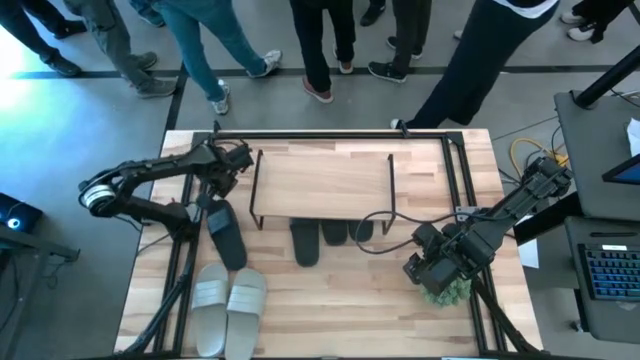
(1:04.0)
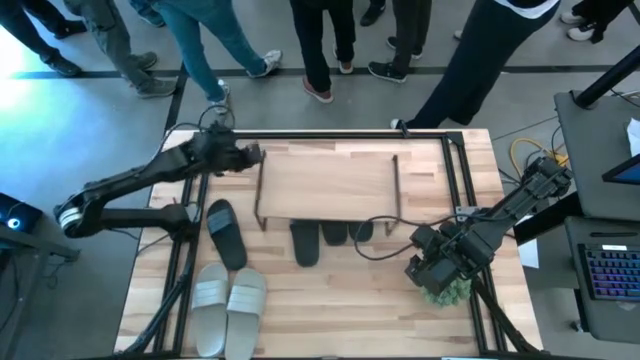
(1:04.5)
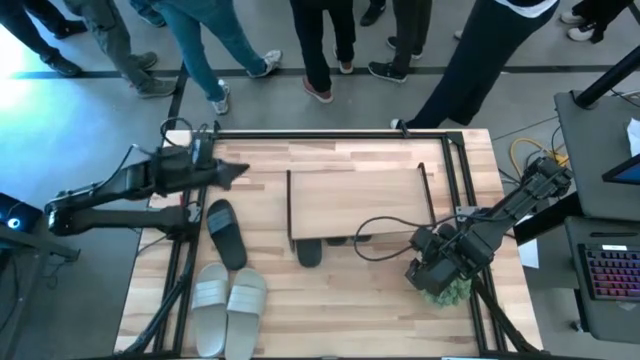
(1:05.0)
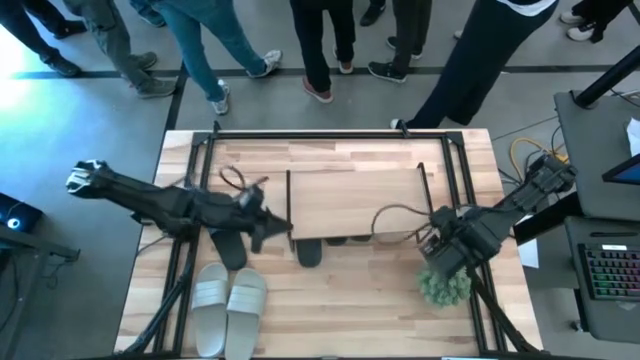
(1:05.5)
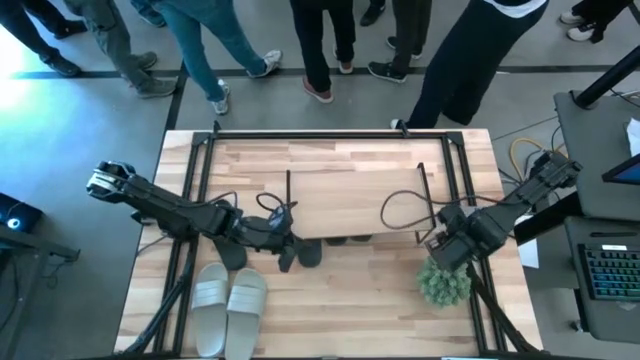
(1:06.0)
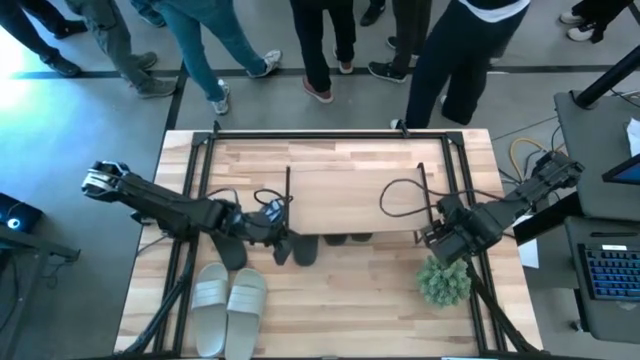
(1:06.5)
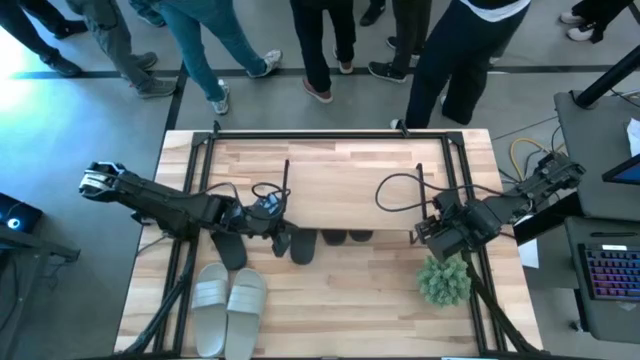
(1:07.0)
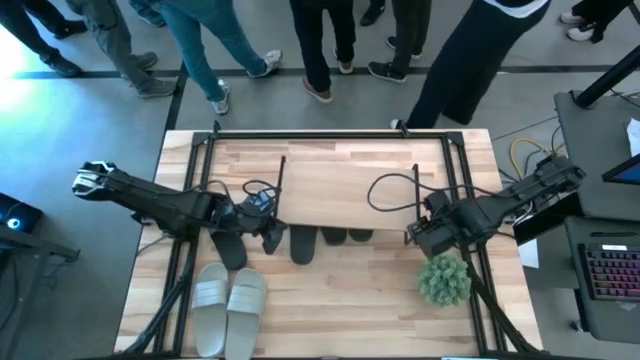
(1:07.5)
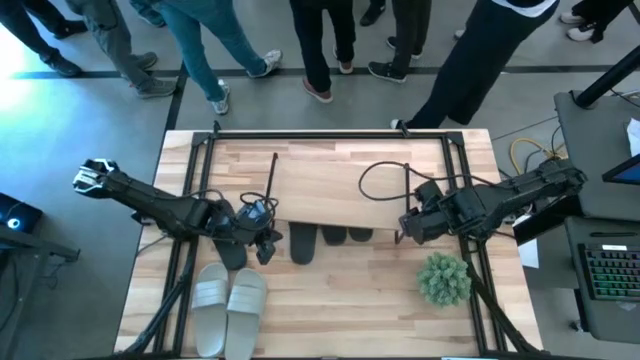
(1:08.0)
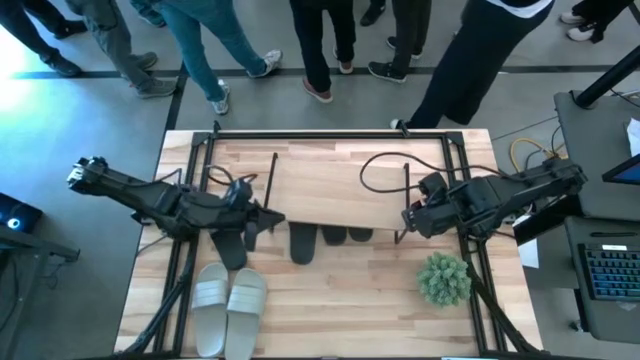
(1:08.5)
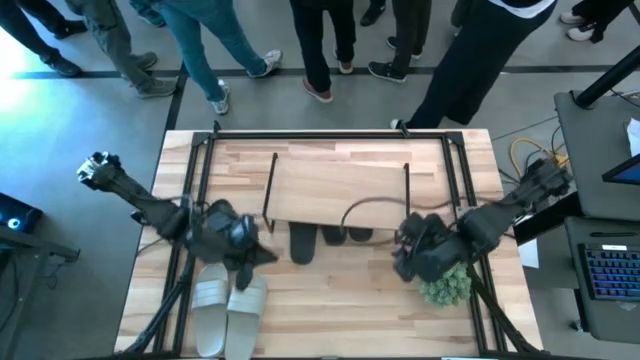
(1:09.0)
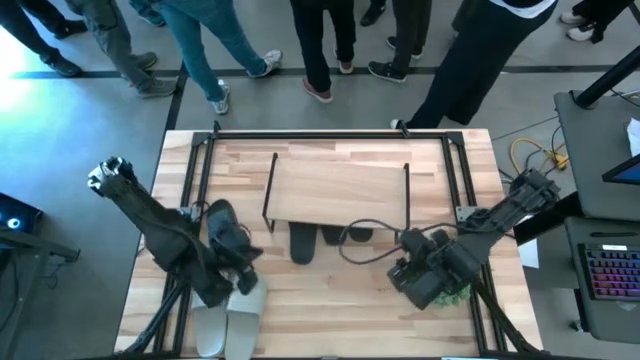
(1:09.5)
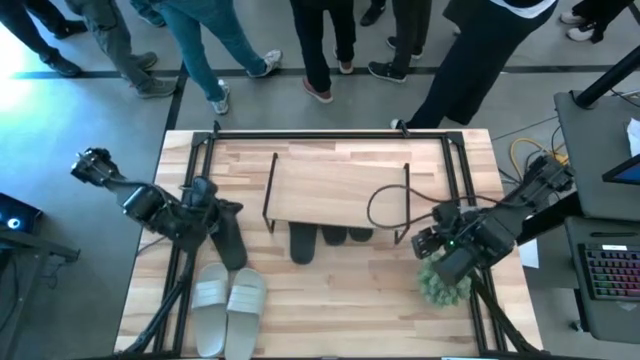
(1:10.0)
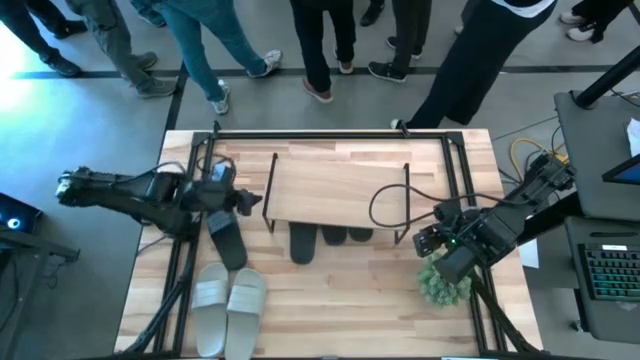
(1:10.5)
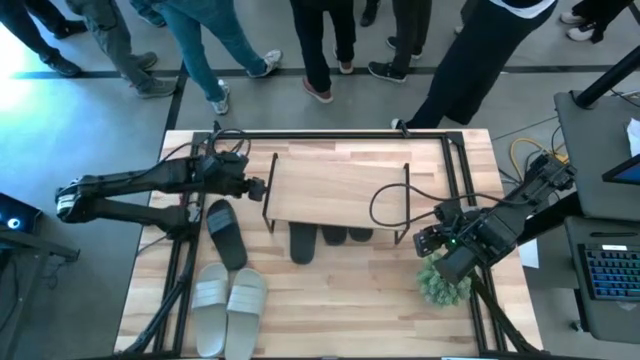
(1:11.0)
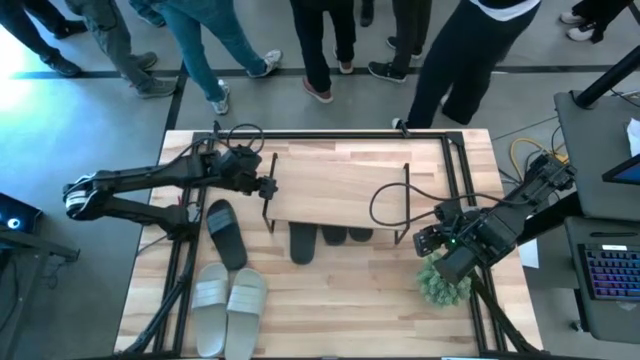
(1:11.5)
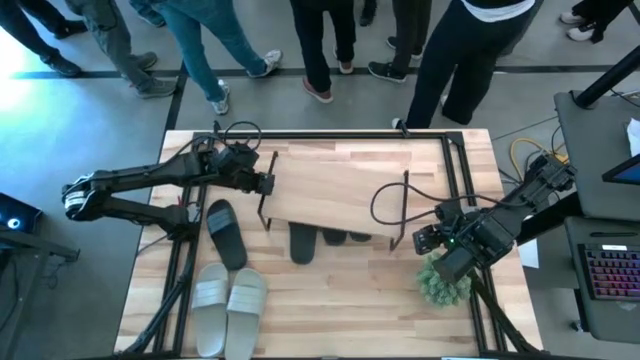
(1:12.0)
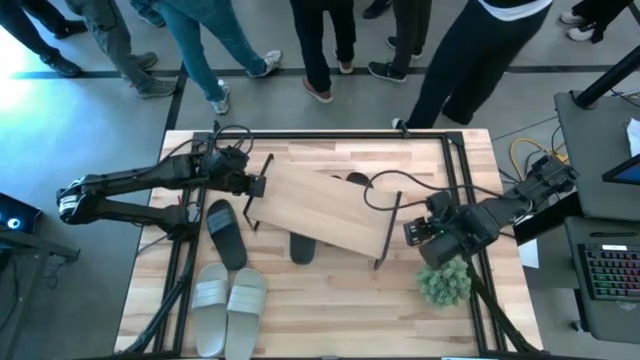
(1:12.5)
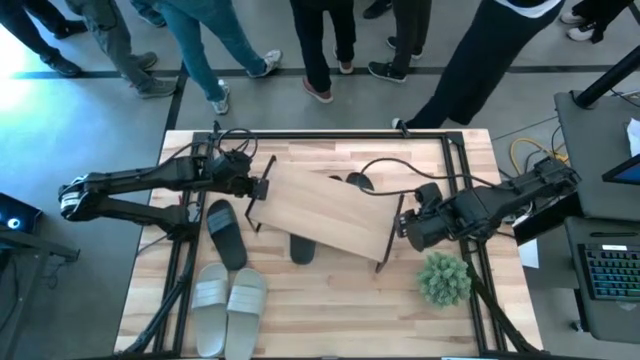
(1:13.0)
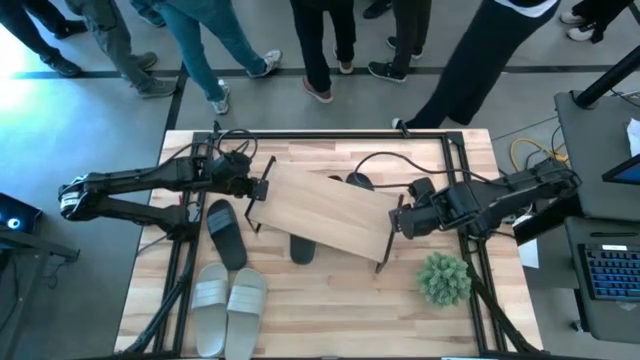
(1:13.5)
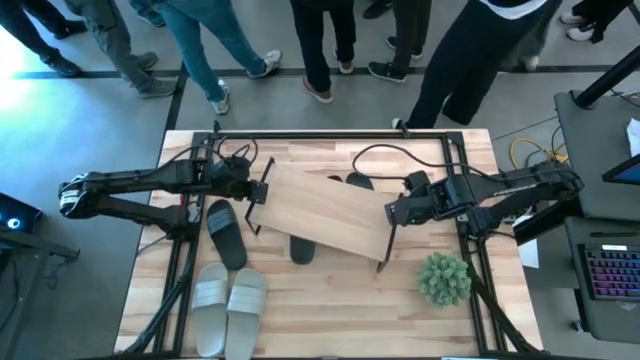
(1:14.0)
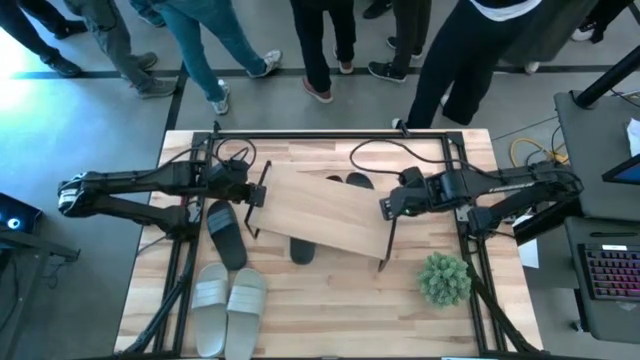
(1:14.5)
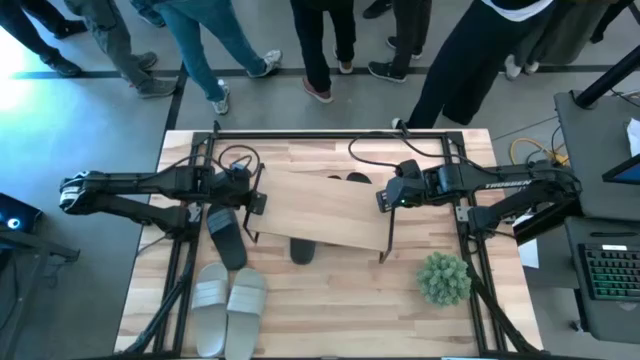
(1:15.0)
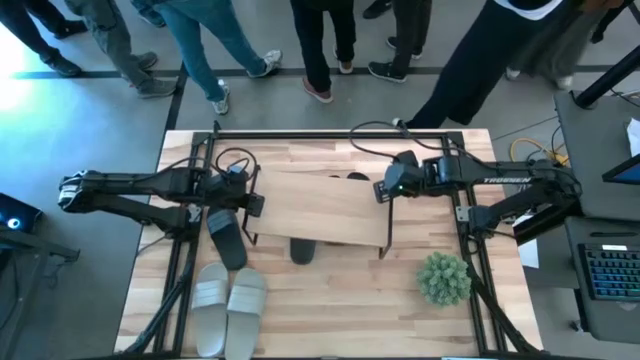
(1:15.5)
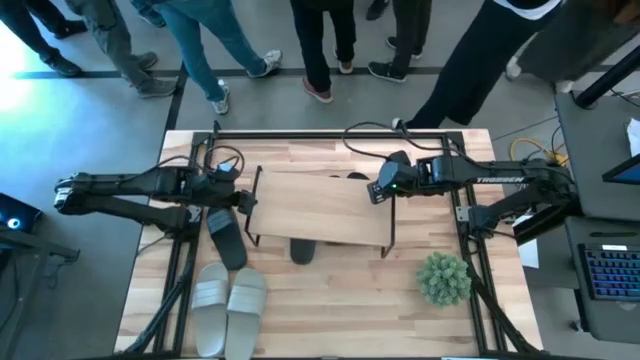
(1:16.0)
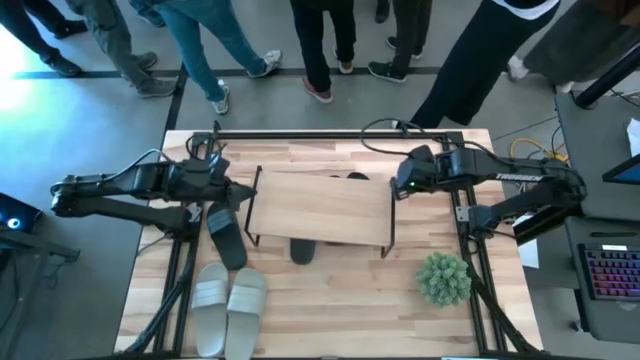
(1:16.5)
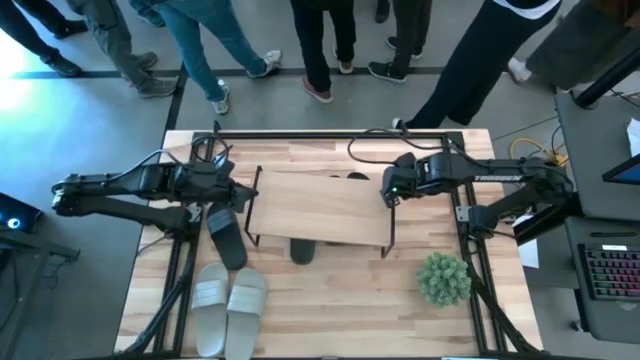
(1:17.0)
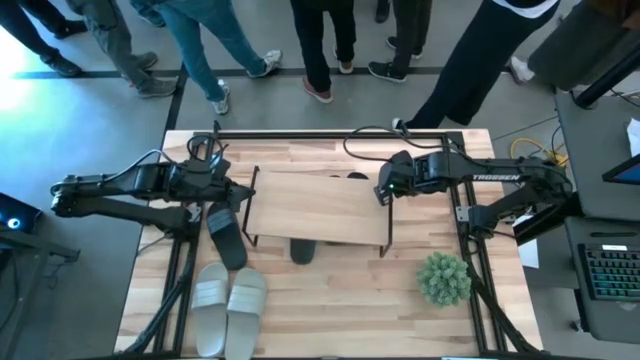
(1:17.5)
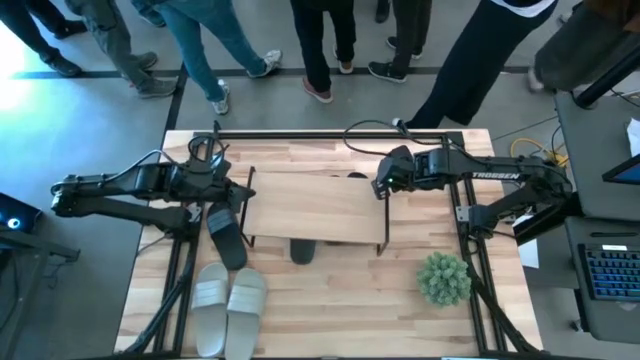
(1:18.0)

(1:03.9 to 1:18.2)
Task: Pick and place slides into the shelf
Adjust the shelf

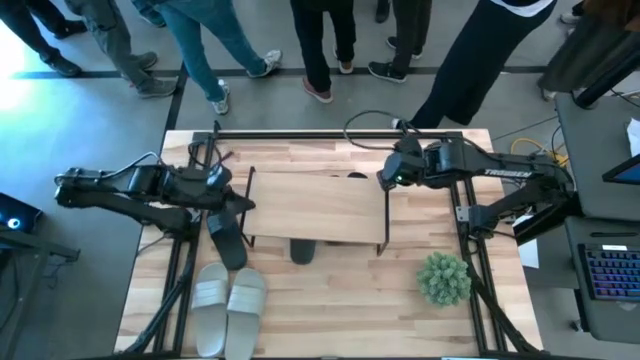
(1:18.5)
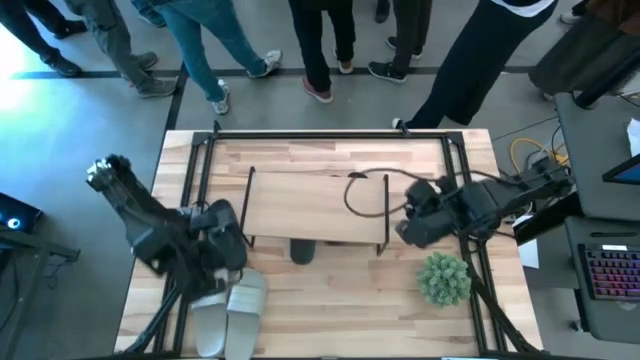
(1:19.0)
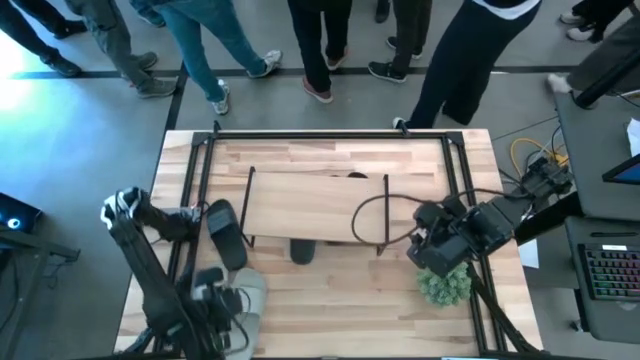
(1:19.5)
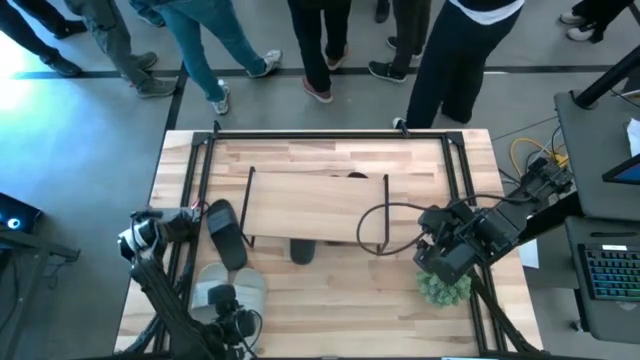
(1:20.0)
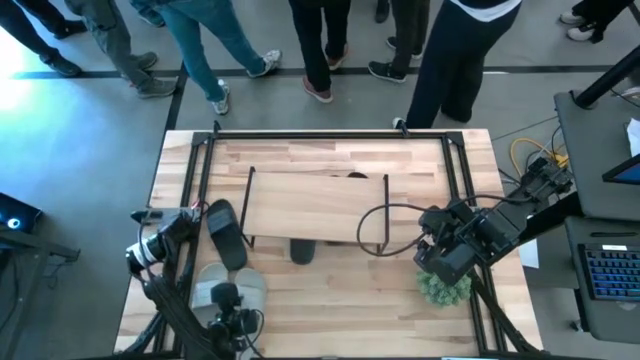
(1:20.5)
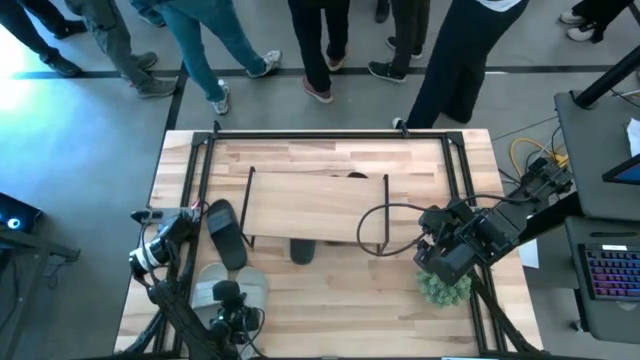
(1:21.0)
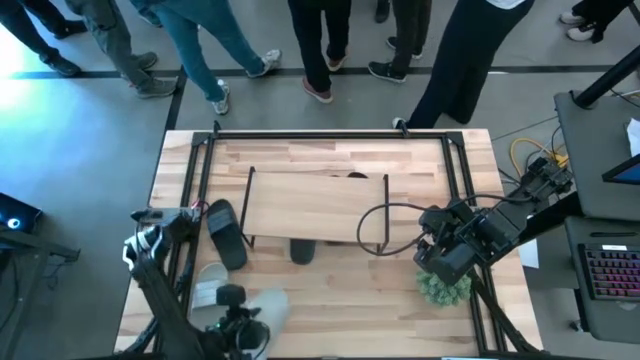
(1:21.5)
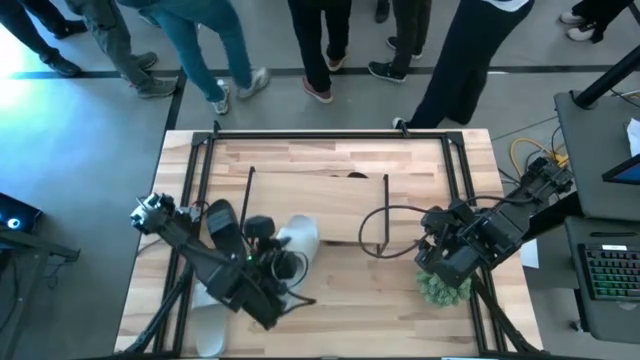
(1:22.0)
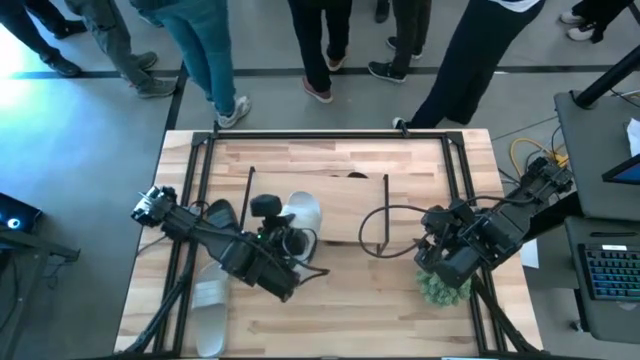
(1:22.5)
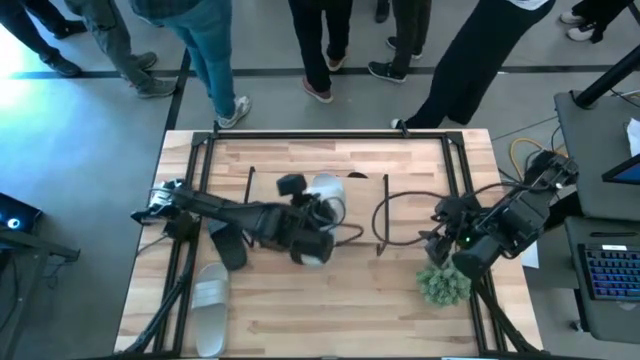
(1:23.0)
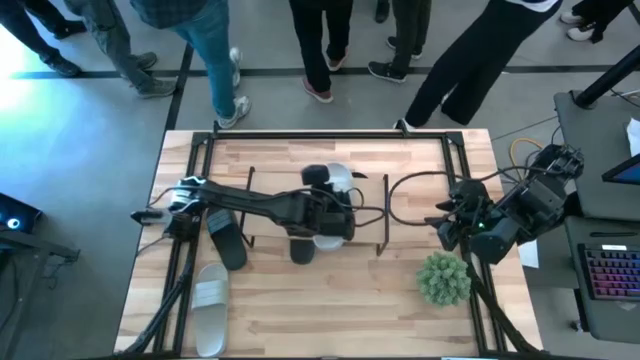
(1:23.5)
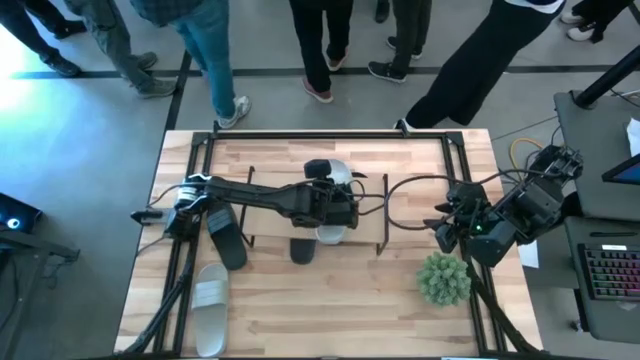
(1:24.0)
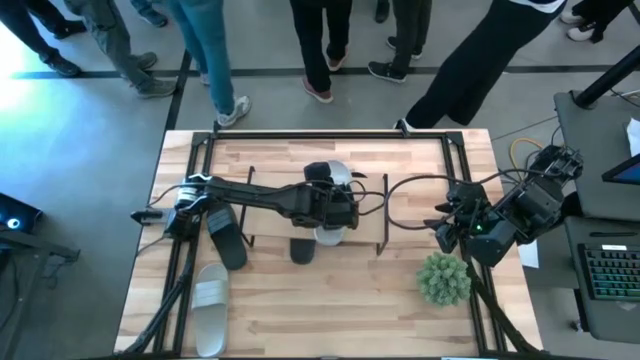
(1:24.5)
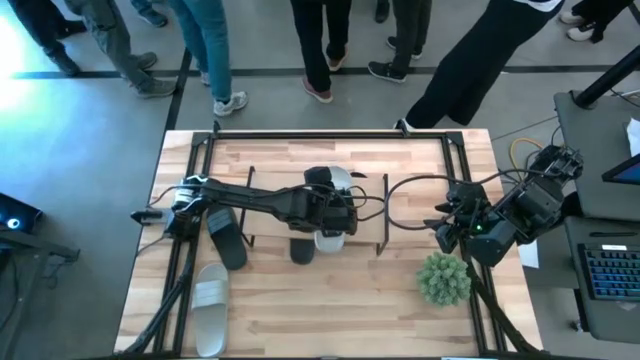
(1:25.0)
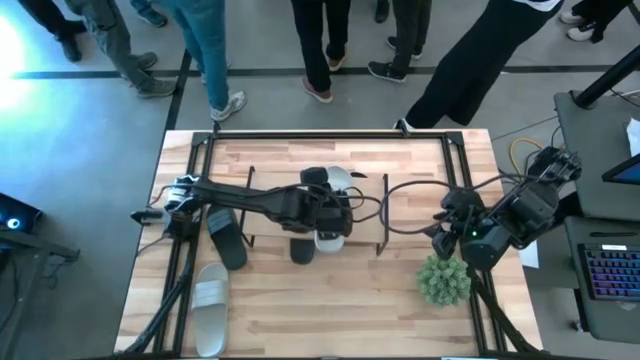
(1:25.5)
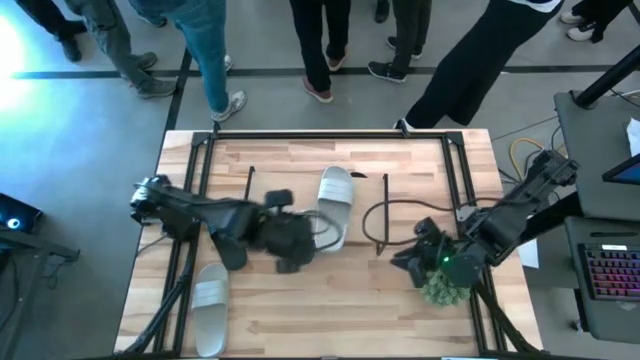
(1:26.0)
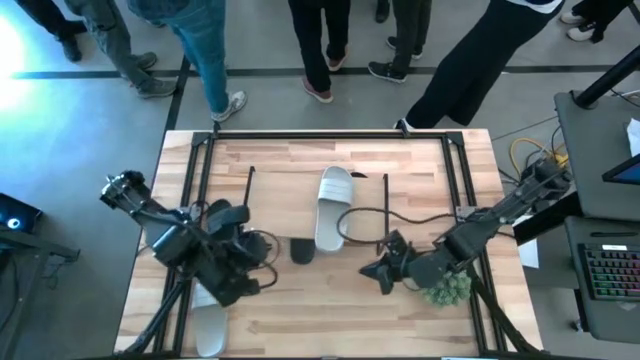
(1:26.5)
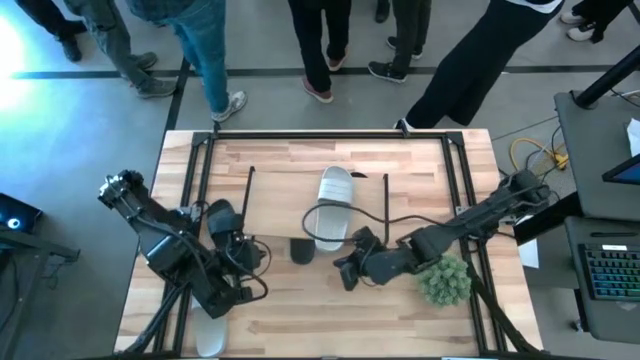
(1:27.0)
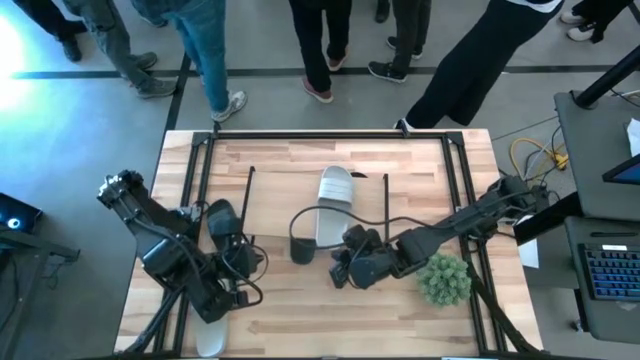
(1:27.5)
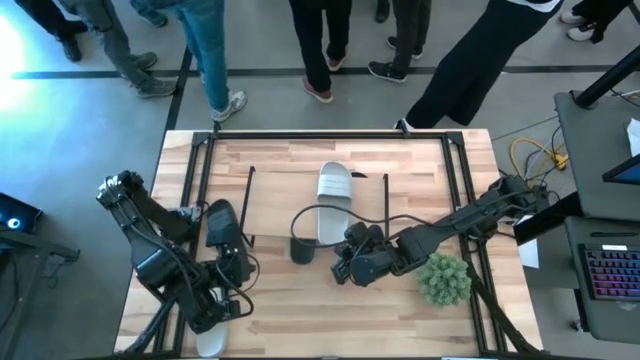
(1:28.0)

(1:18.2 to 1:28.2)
Put the right gray slide on the shelf
